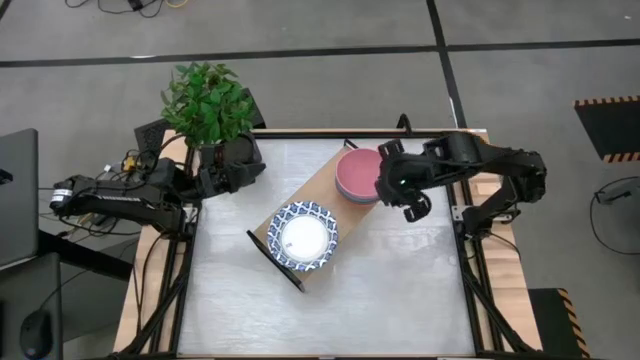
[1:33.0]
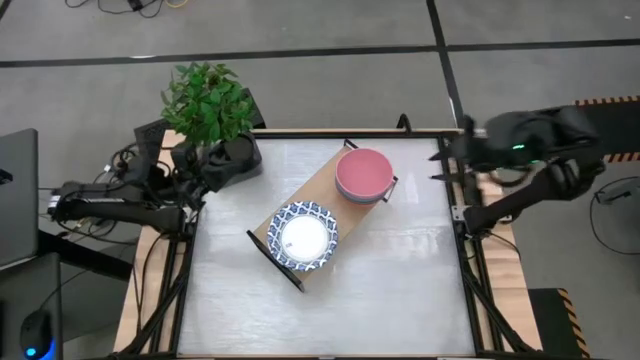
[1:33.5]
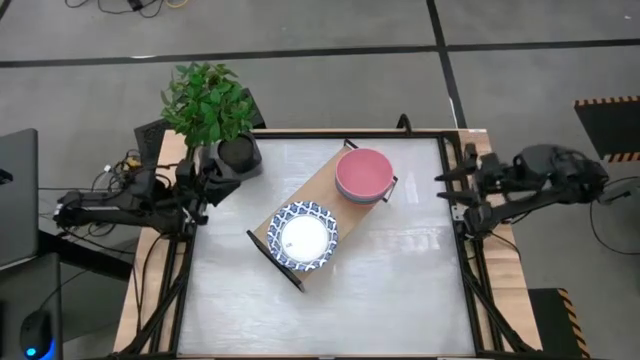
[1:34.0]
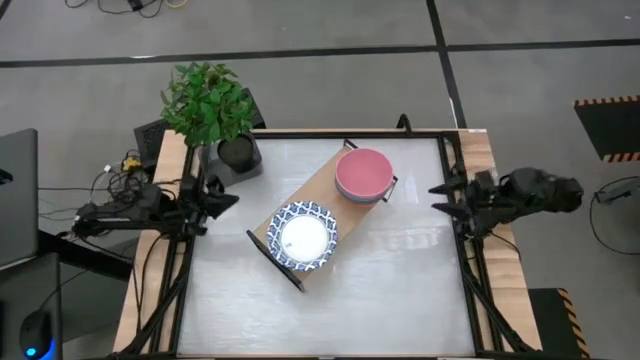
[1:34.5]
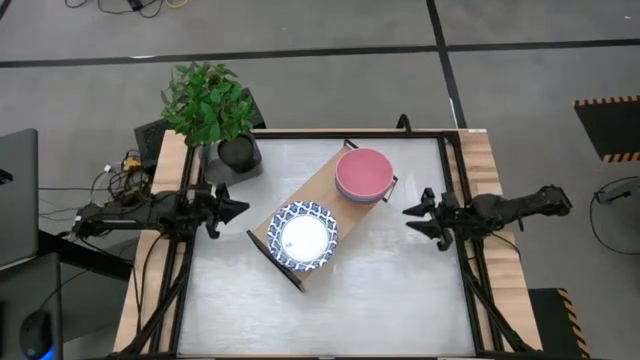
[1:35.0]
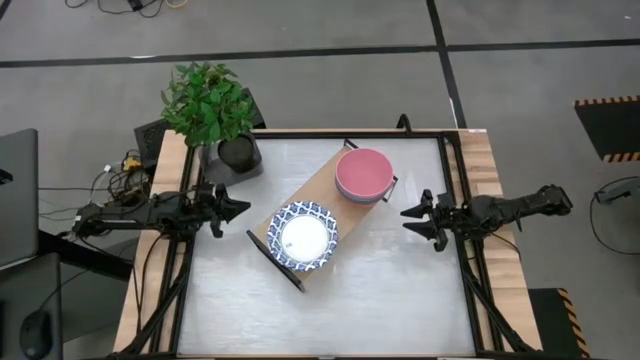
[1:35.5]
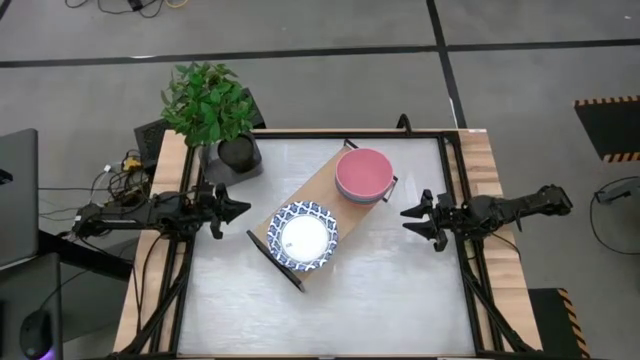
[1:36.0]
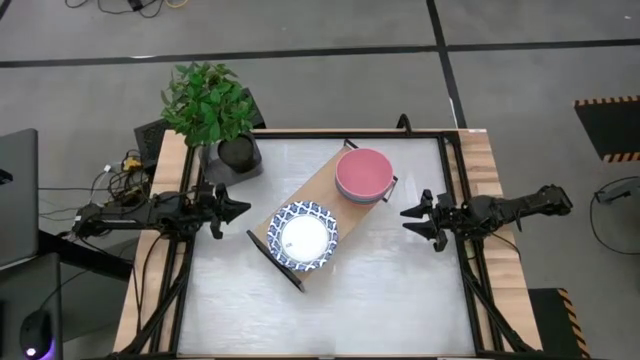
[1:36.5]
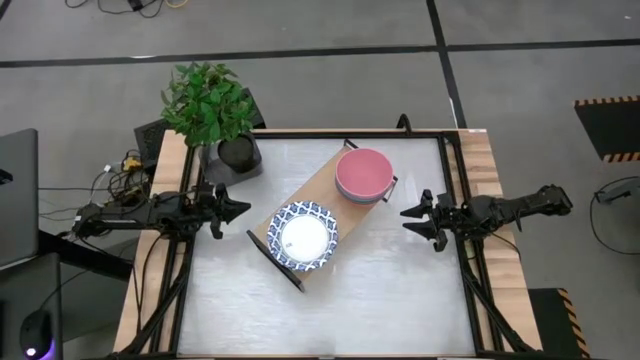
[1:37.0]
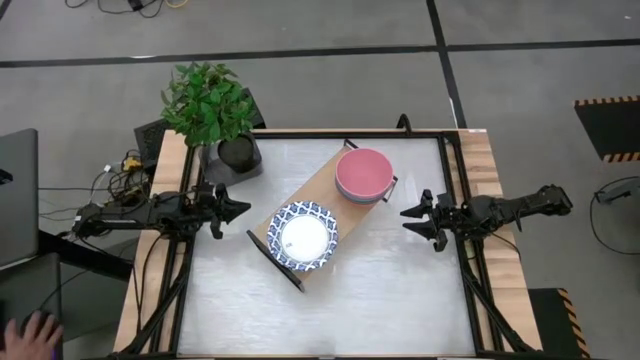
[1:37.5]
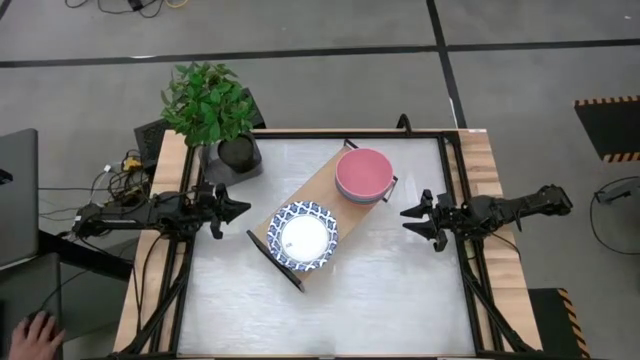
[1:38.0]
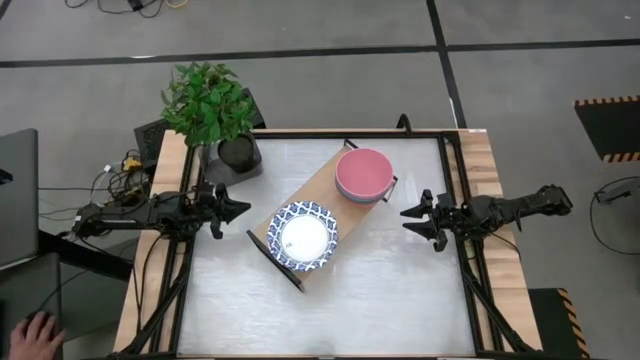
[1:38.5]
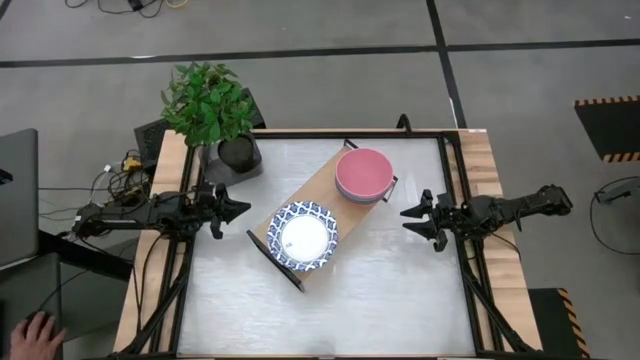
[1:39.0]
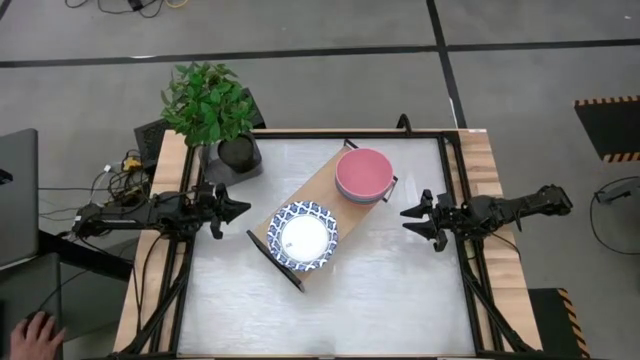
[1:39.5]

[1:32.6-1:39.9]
Task: Place and stack bowls onto a shelf
Return to Home Position

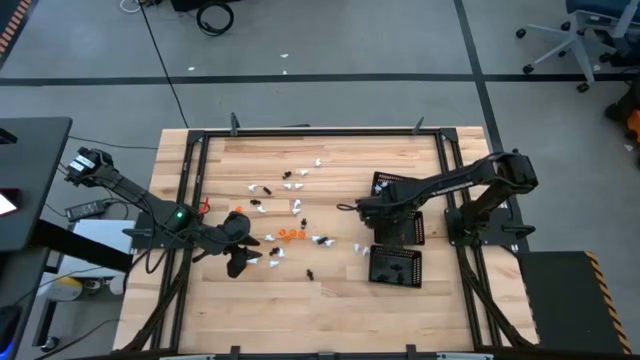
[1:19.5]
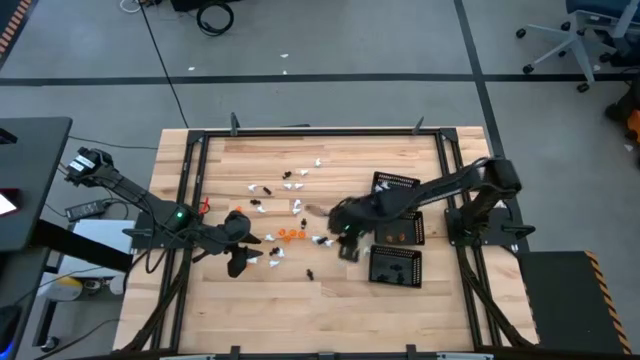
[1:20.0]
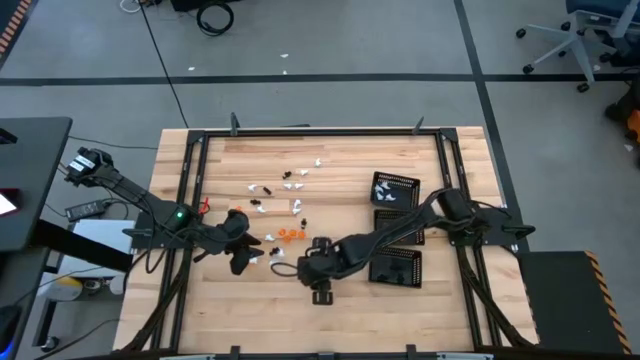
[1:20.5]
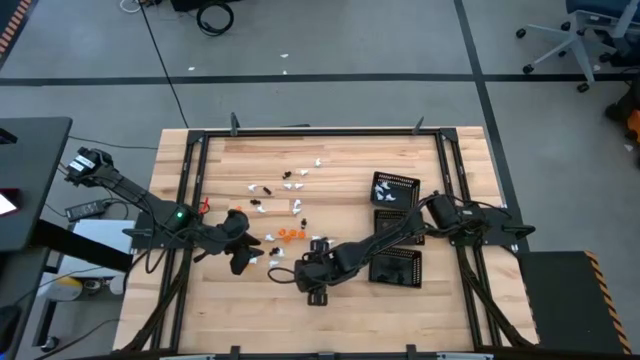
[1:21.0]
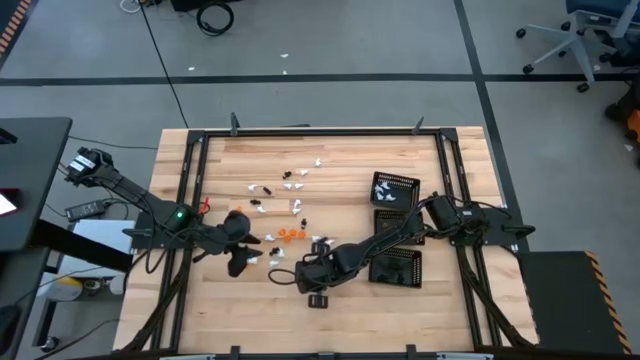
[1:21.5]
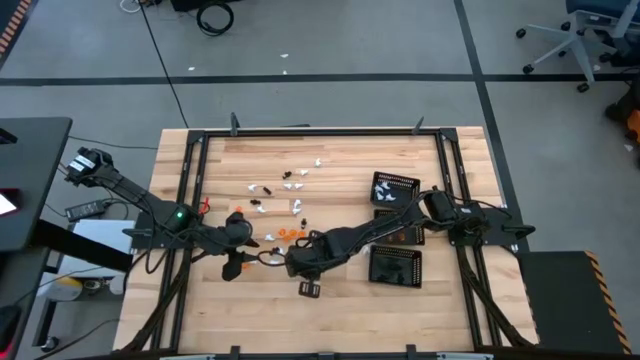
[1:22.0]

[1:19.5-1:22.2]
Task: Sort Halloween decoration
Put the black ghost toy into the bottom black bin

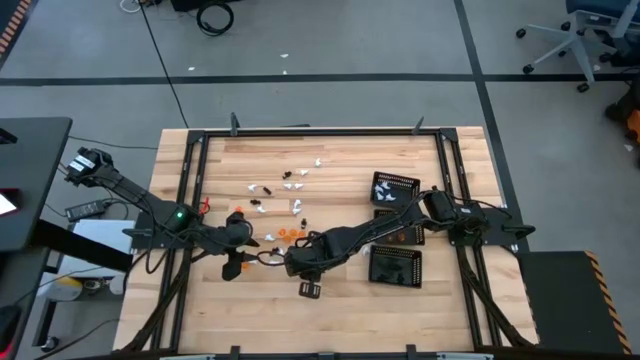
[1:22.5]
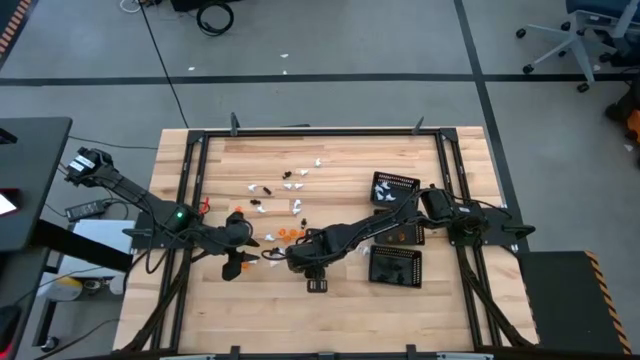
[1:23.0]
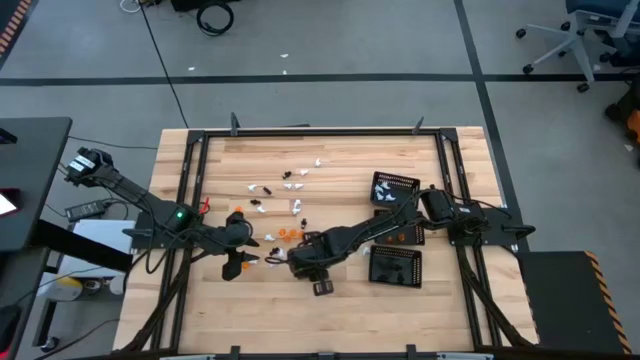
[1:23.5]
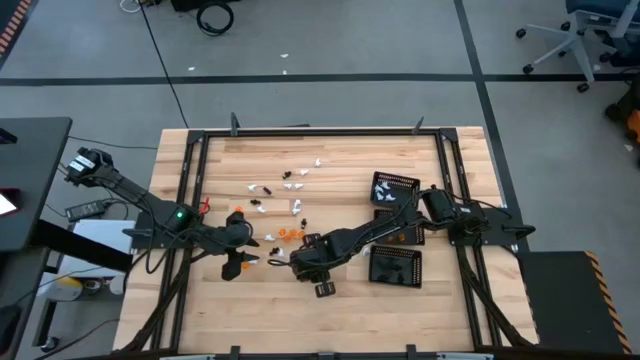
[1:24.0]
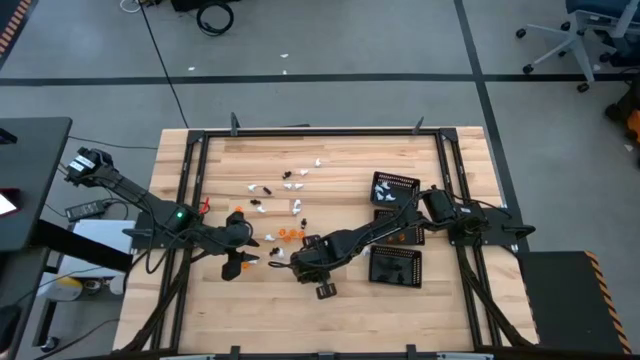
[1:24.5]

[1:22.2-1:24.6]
Put the black ghost toy into the bottom black bin

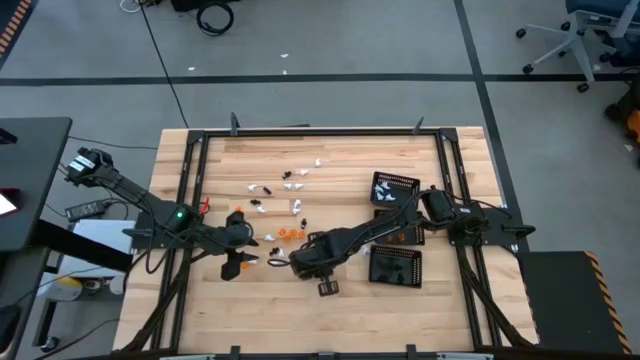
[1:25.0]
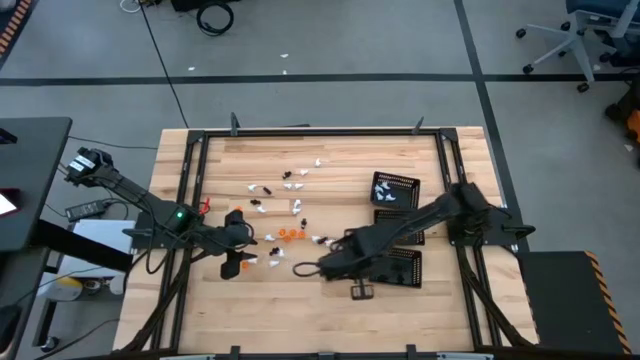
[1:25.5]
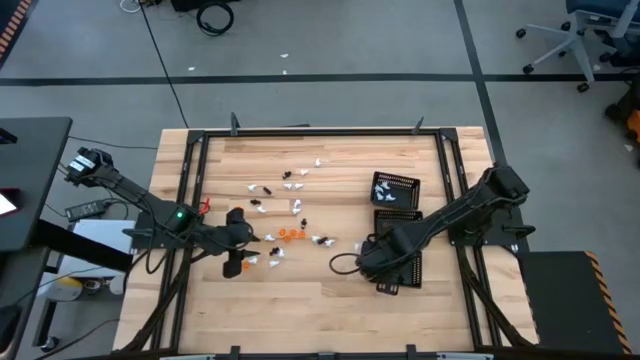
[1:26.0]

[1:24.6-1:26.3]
Put the black ghost toy into the bottom black bin

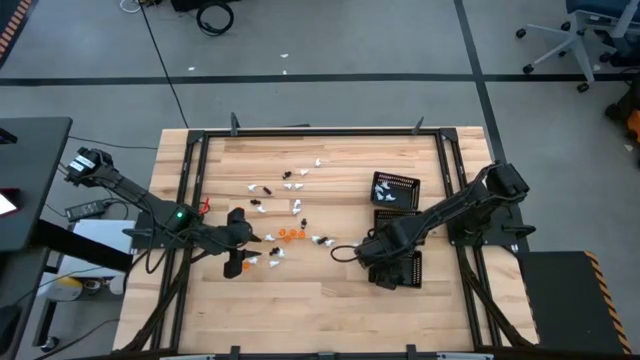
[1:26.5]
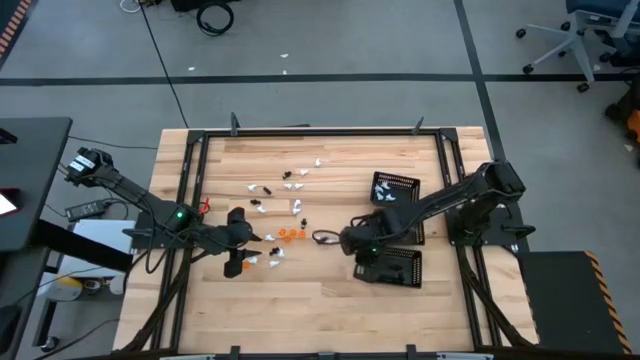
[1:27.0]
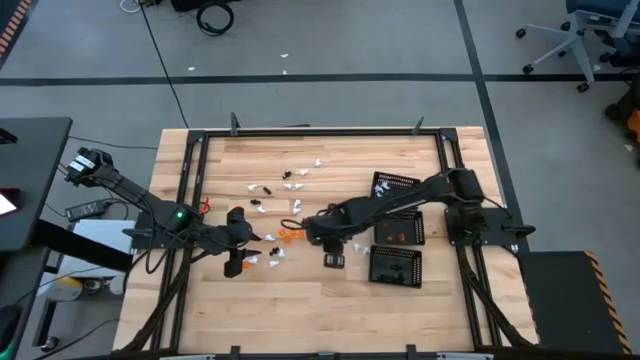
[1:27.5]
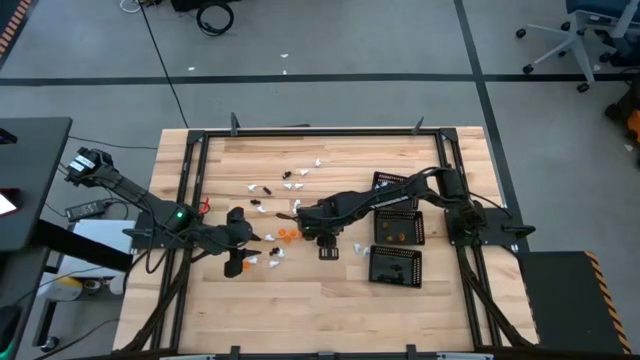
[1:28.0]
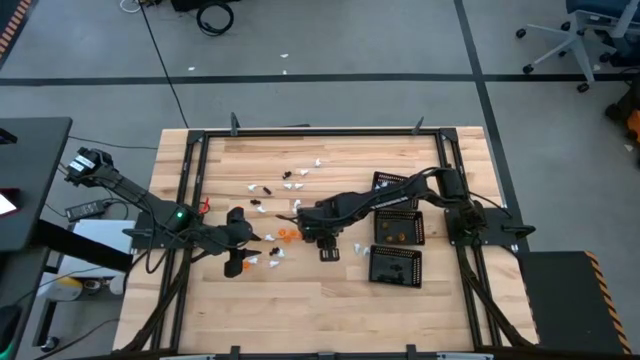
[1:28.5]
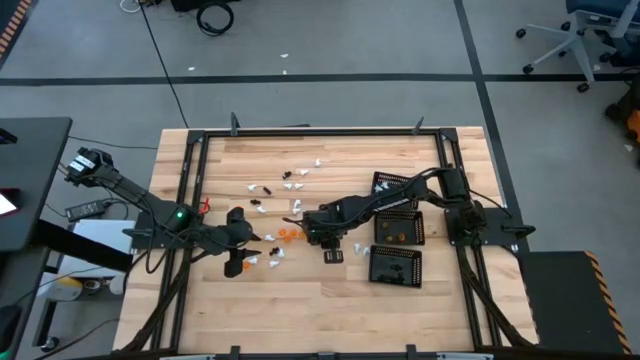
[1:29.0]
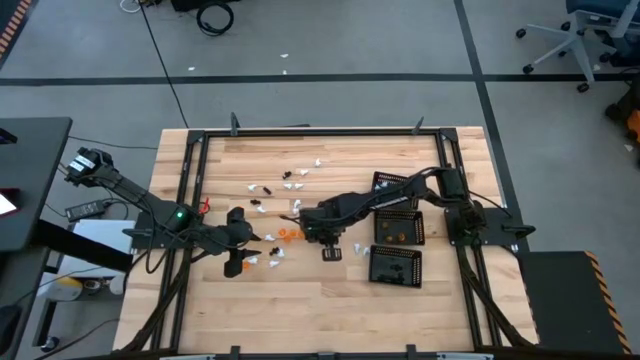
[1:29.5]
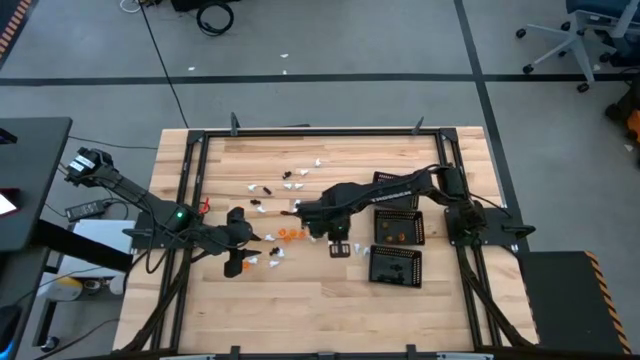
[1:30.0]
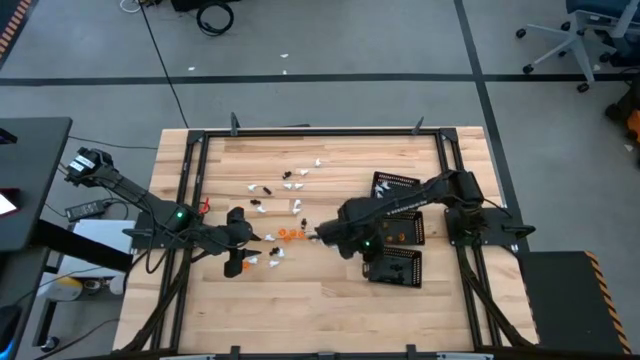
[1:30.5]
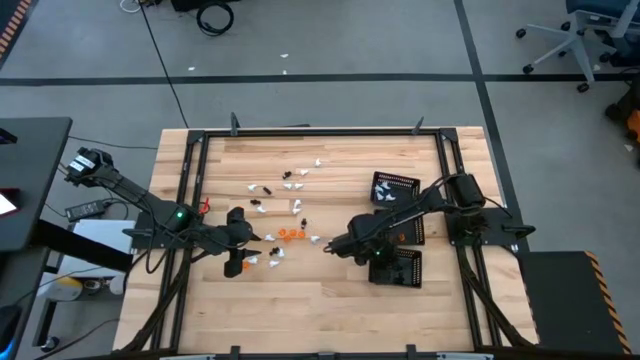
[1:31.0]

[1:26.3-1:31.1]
Put the black ghost toy into the bottom black bin
